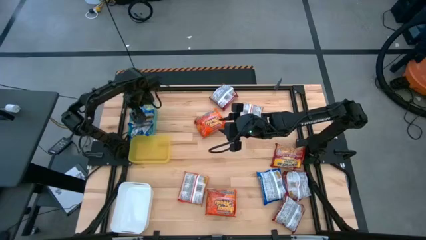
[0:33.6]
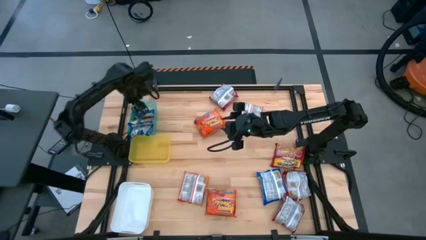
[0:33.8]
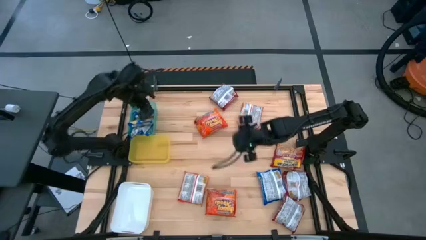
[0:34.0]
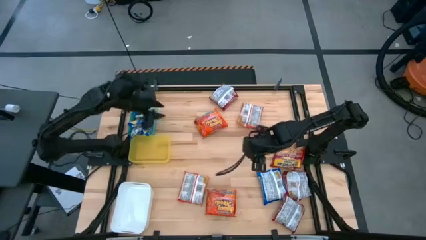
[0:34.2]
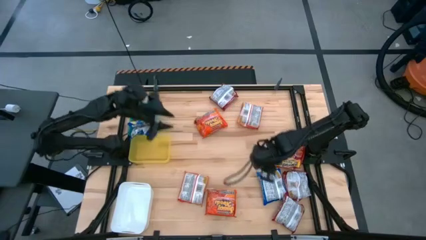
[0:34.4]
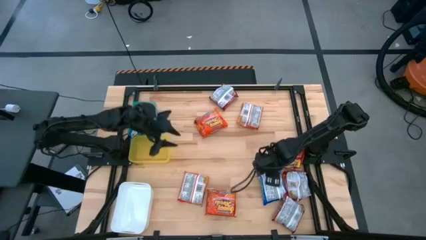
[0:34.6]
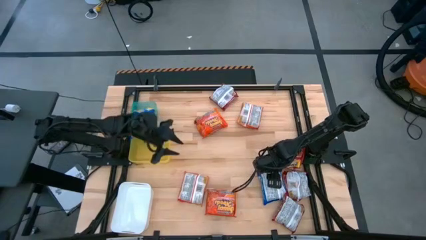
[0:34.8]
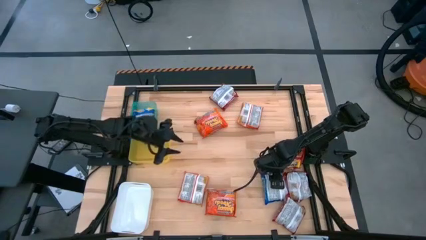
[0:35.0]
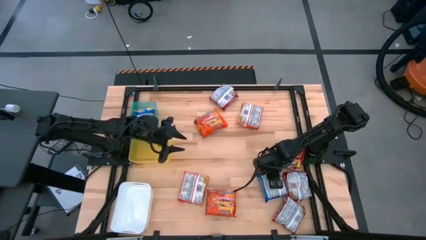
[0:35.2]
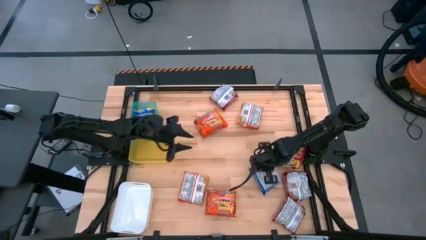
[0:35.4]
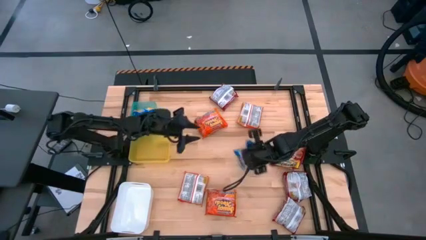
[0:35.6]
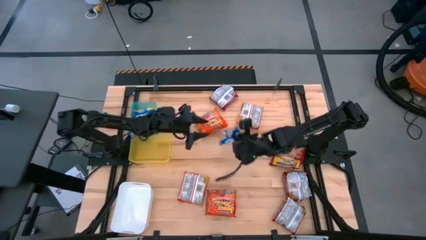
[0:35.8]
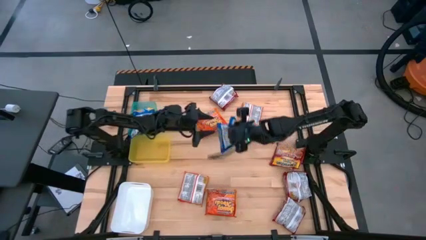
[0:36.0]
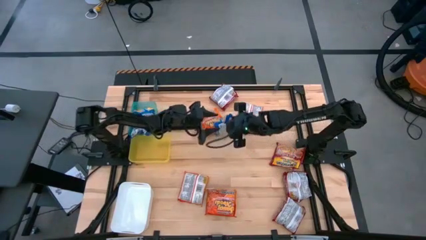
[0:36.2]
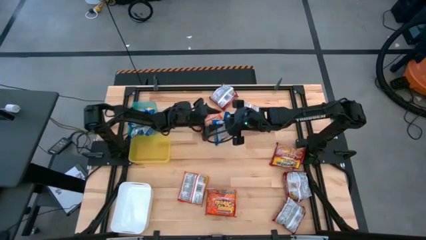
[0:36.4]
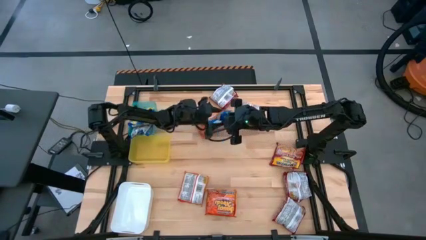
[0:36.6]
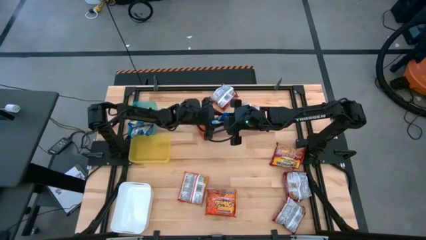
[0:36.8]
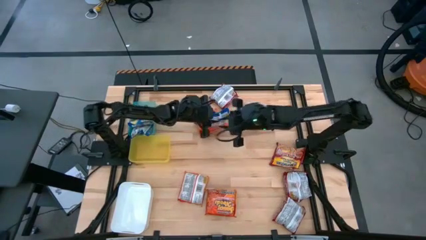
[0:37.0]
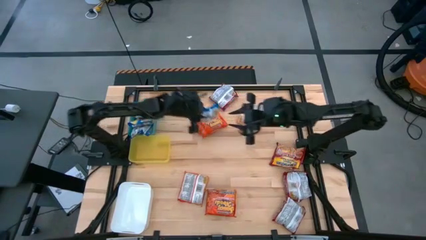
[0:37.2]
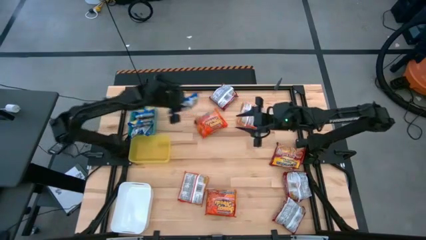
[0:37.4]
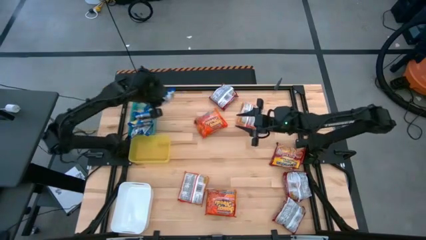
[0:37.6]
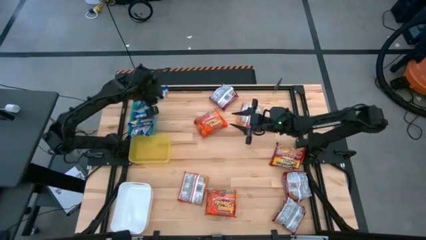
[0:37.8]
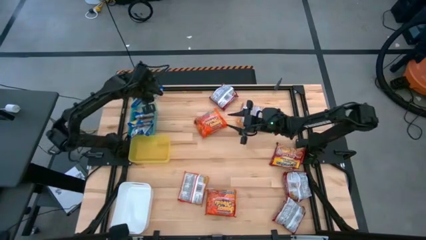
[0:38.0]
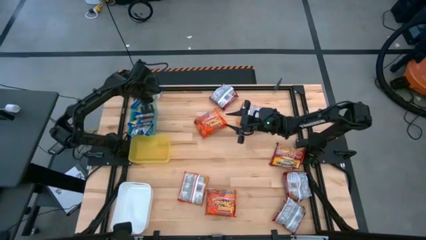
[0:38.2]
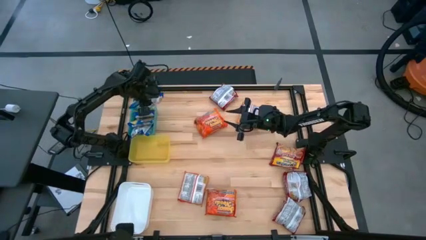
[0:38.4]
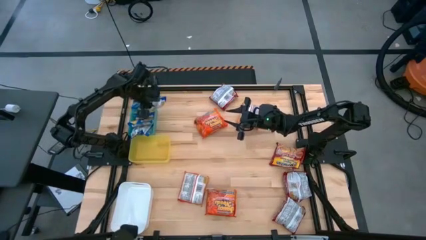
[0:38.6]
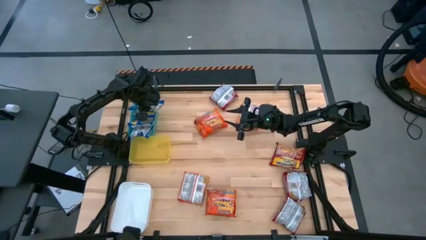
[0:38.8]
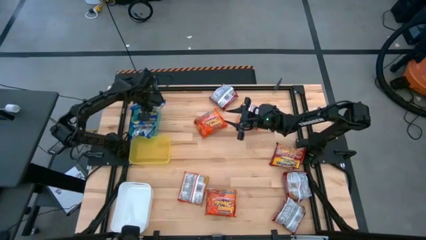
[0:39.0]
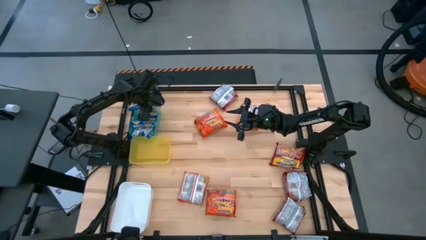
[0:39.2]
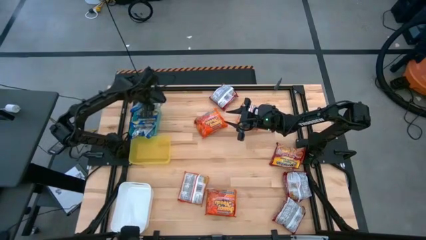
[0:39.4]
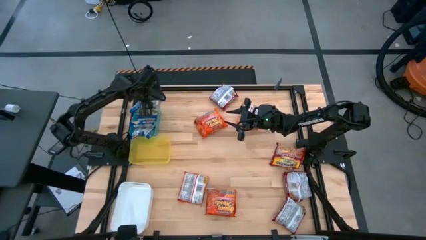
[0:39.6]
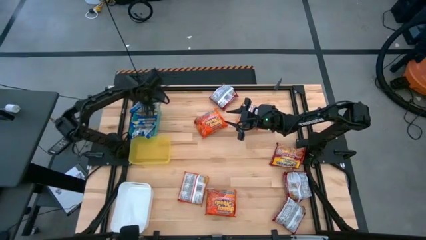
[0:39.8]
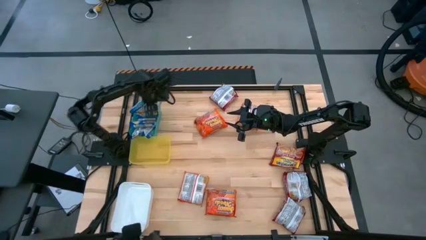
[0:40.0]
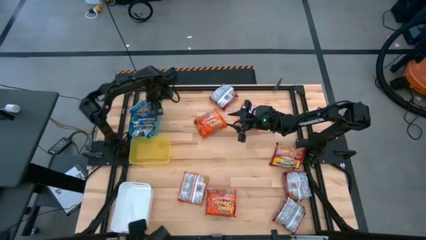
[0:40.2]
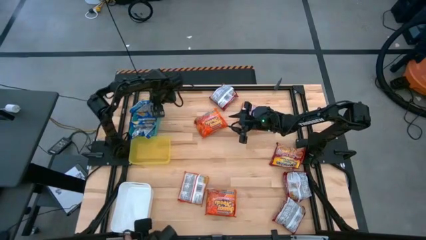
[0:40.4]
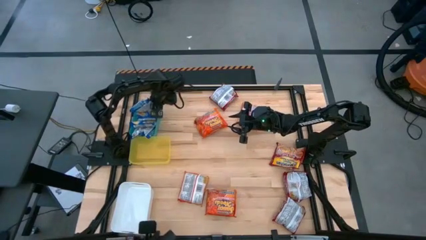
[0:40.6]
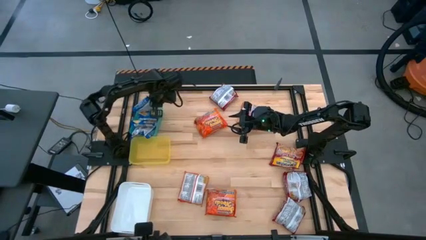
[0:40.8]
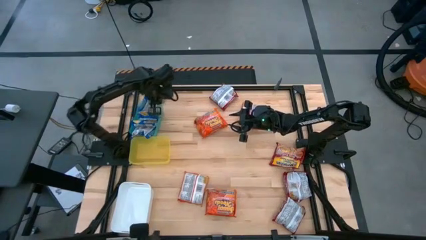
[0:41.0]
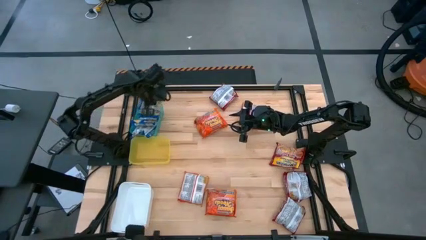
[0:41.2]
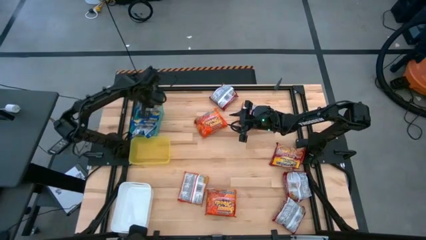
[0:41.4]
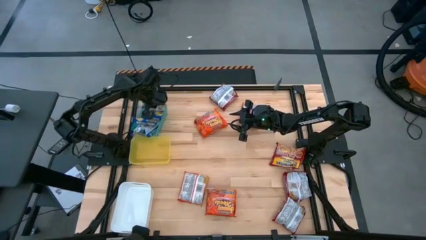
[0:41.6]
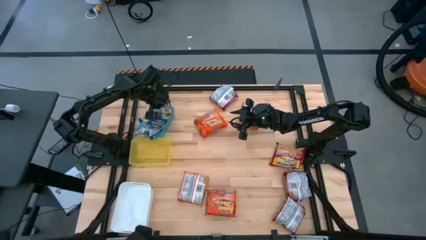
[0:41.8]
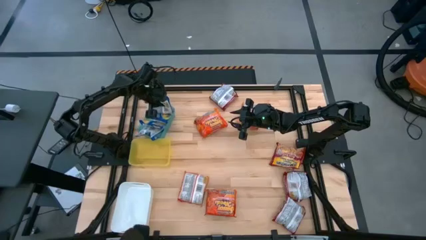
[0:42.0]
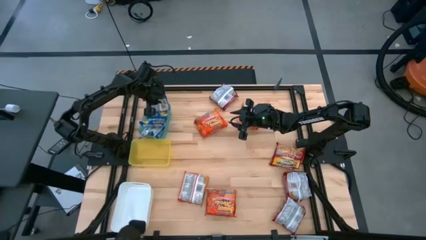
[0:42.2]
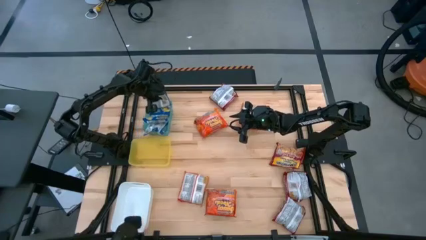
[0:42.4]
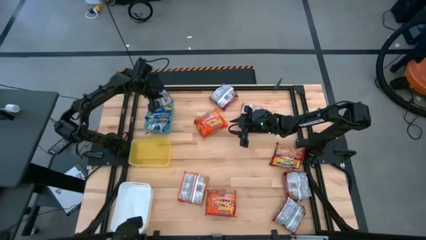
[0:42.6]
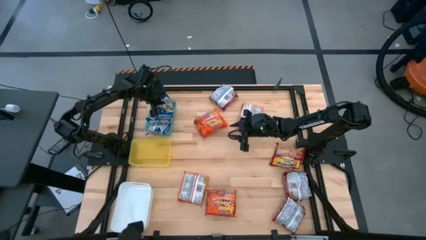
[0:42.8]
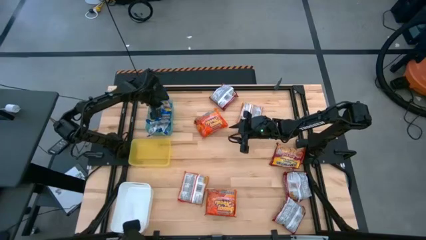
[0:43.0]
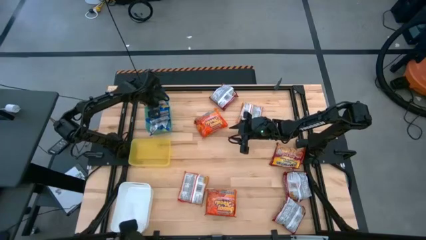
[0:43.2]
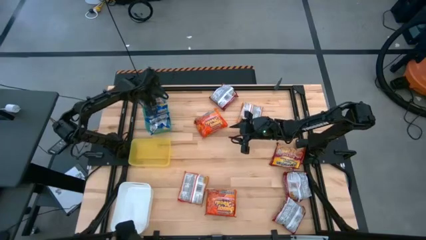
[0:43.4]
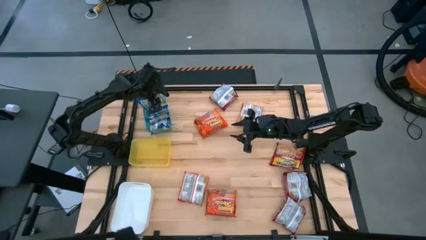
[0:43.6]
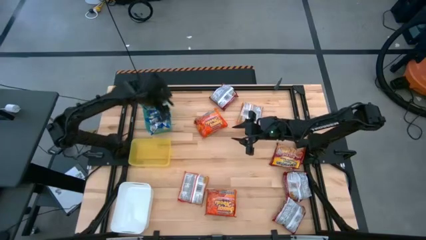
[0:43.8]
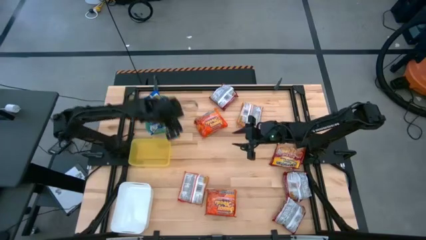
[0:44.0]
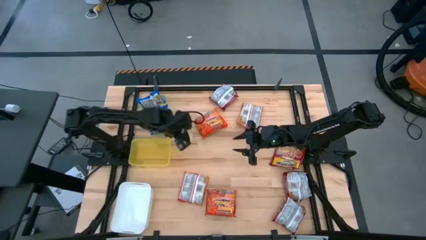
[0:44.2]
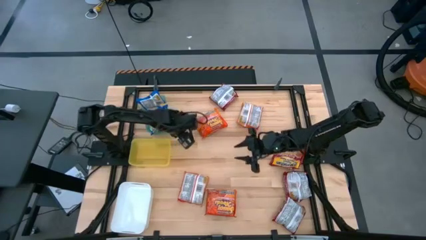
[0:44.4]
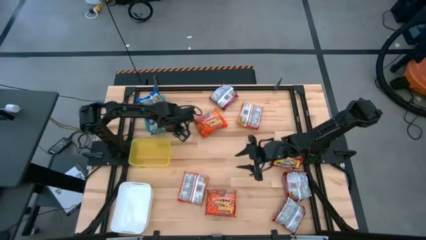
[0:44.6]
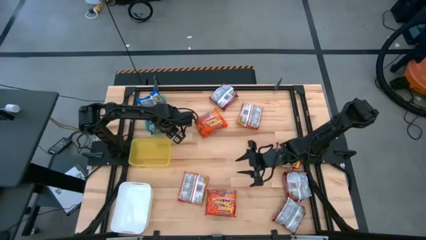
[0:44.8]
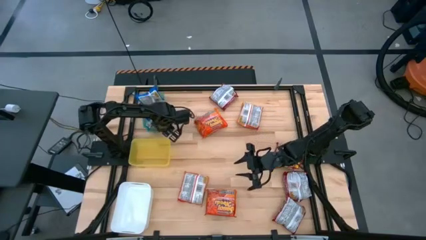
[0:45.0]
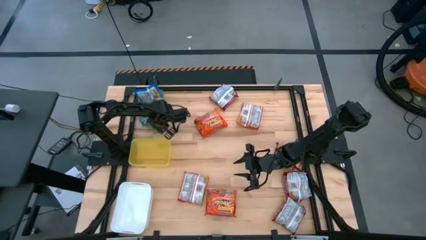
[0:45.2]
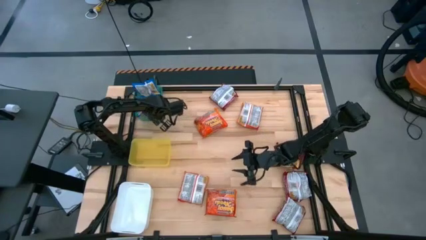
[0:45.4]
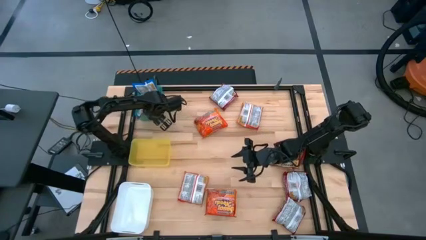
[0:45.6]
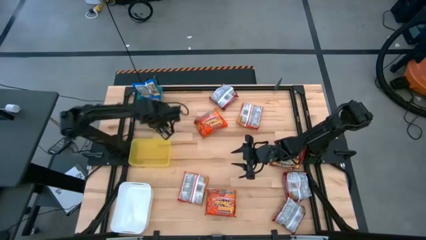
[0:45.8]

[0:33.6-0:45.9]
Task: Sort Maruchan noodles
Put the blue noodle pack into the blue bin

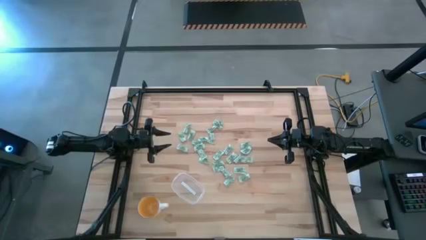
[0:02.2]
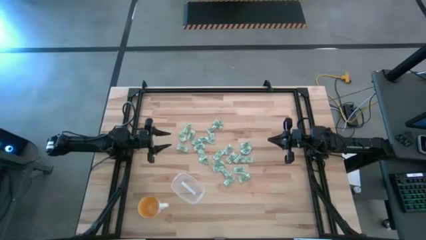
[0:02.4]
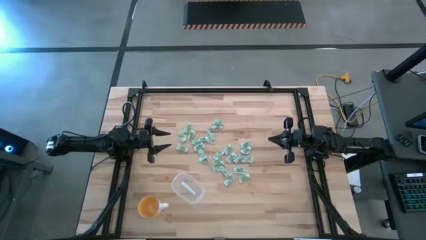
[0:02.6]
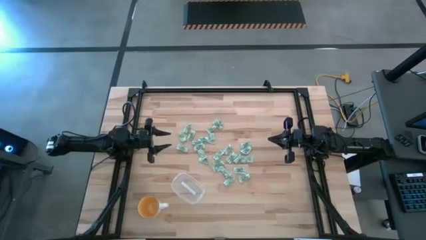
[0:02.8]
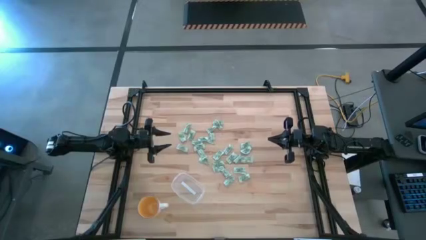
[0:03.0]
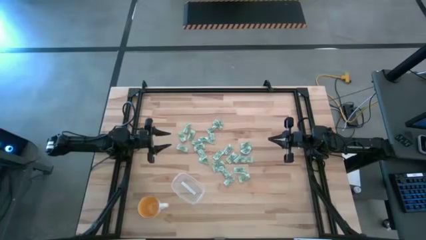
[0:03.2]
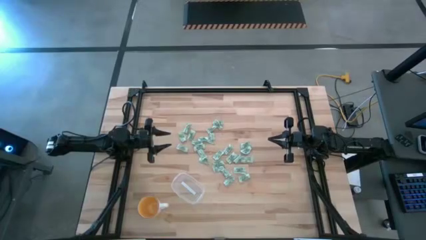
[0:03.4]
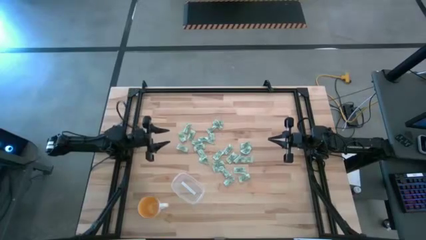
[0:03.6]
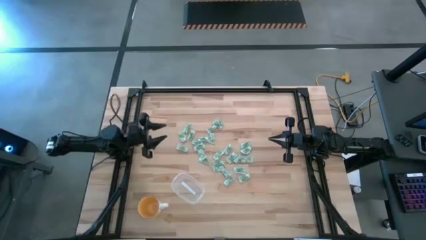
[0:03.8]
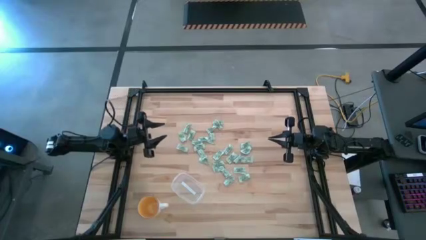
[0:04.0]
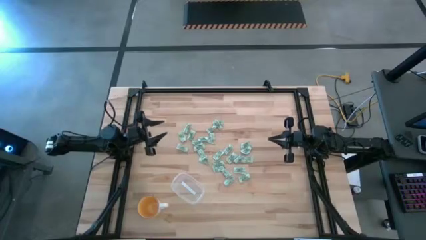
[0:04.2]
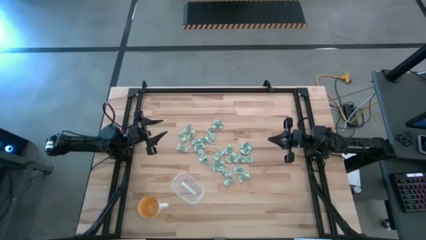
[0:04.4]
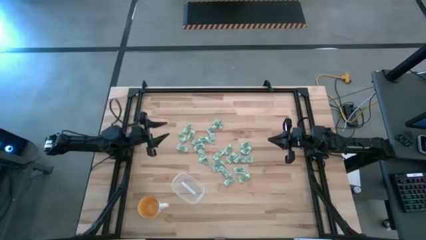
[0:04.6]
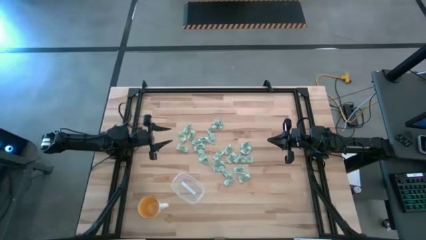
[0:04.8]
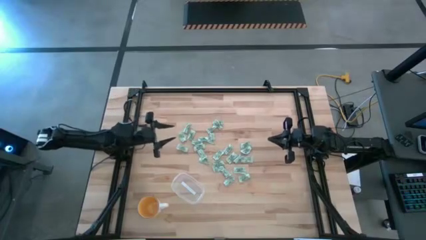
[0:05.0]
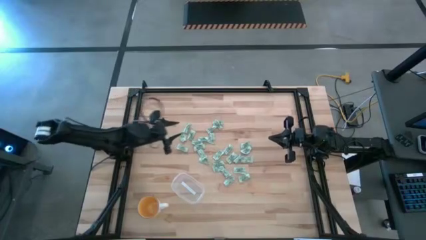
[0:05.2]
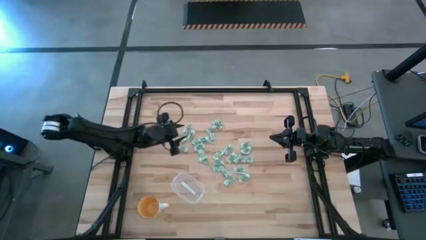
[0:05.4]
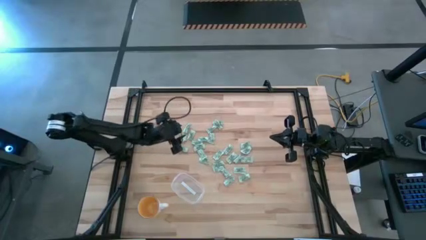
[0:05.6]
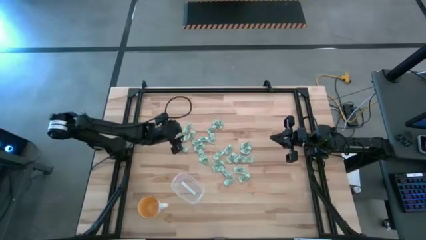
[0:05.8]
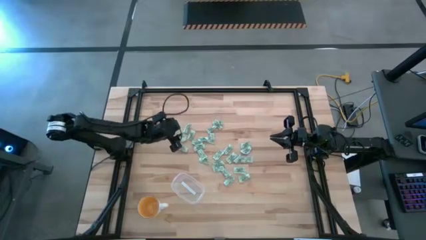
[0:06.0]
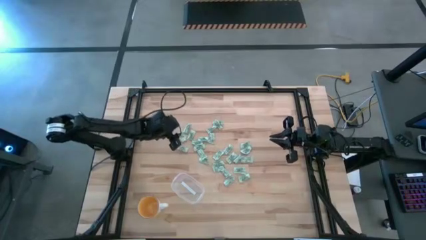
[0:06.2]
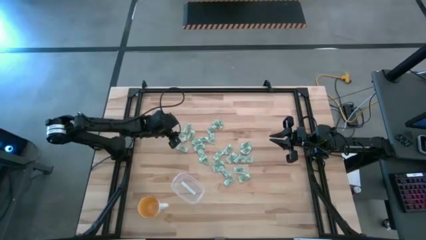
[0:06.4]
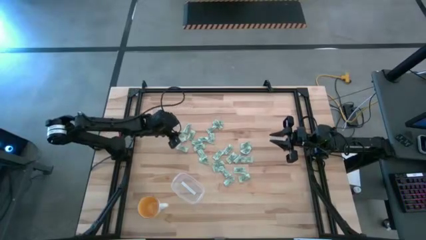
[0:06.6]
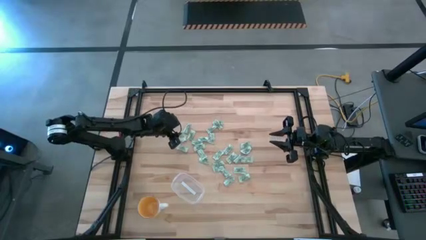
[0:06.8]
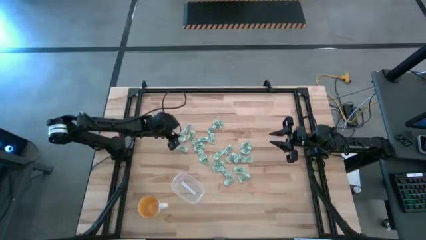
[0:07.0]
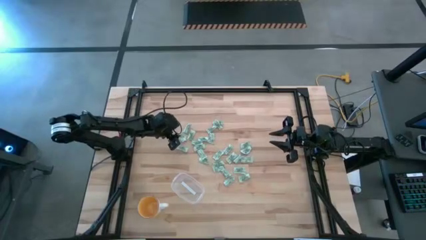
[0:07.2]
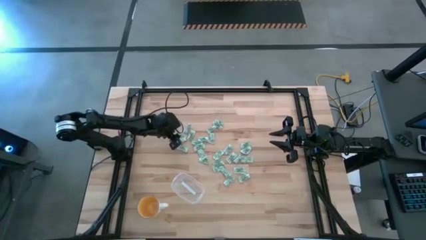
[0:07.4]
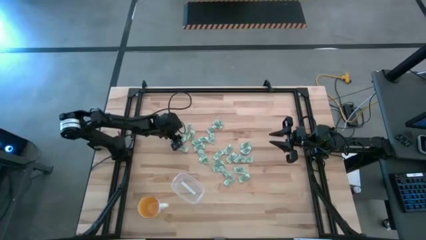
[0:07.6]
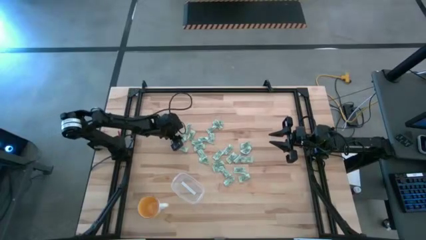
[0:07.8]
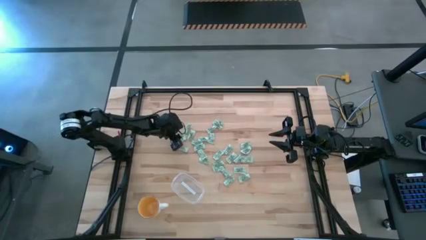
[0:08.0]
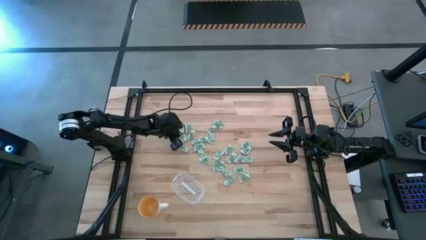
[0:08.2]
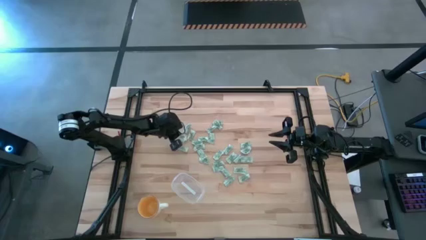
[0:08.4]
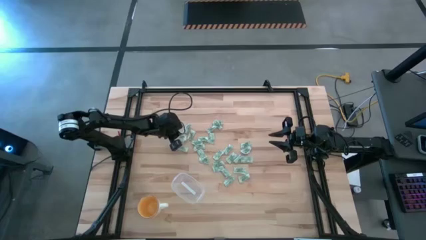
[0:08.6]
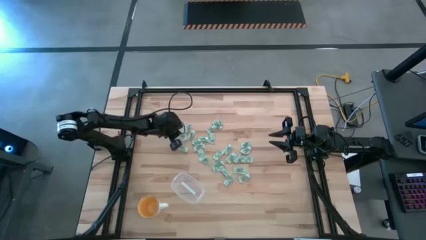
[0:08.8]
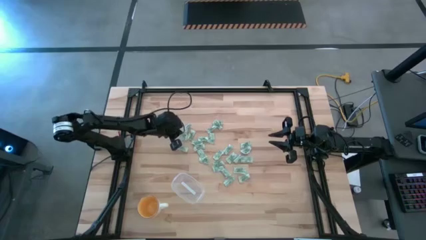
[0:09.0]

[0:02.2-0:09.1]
Task: Pick and place Stevia / Truvia into bins
Put the stevia packet into the transparent container
